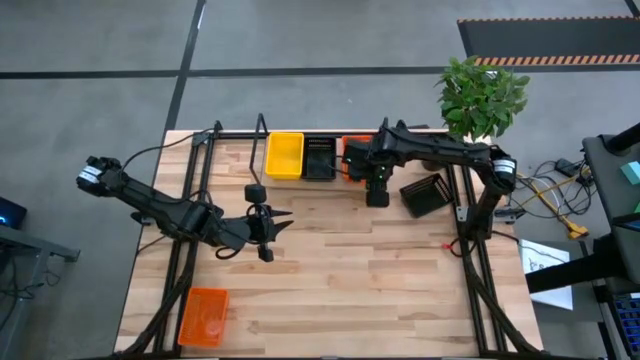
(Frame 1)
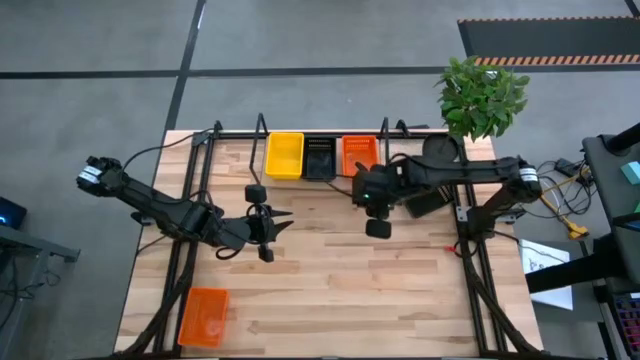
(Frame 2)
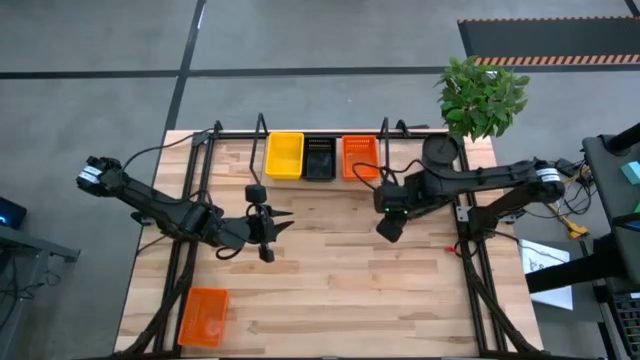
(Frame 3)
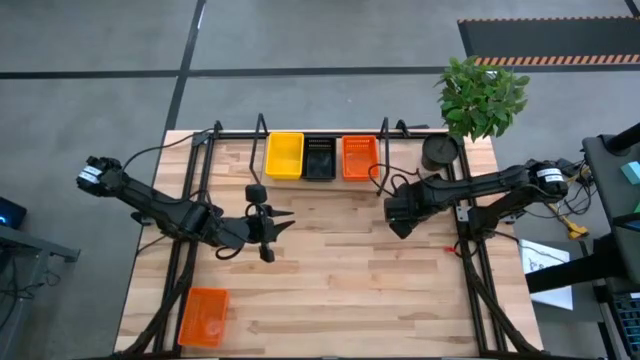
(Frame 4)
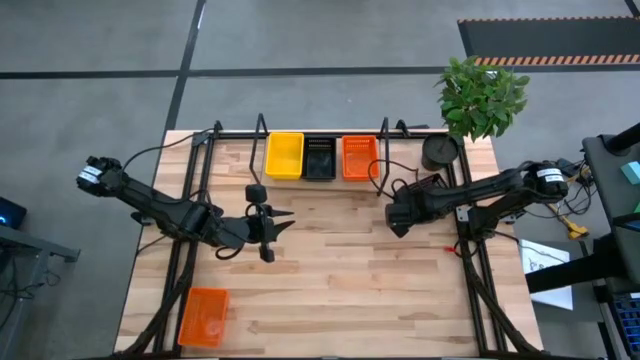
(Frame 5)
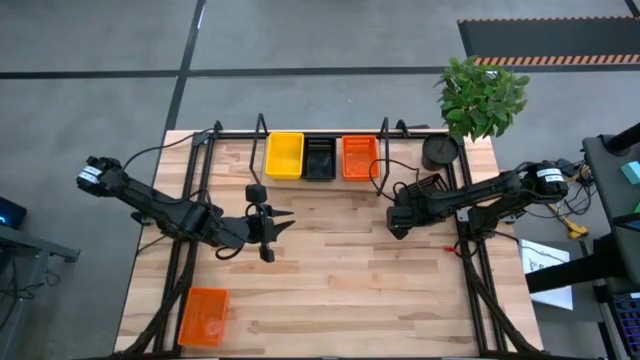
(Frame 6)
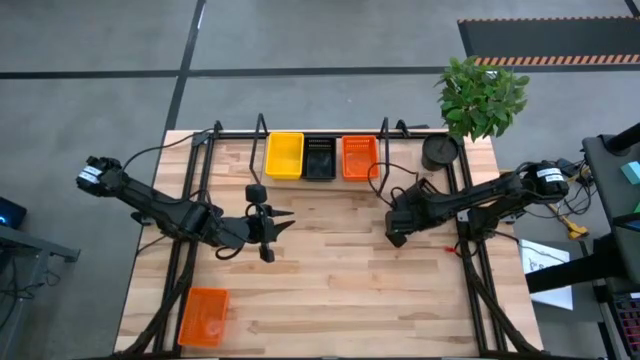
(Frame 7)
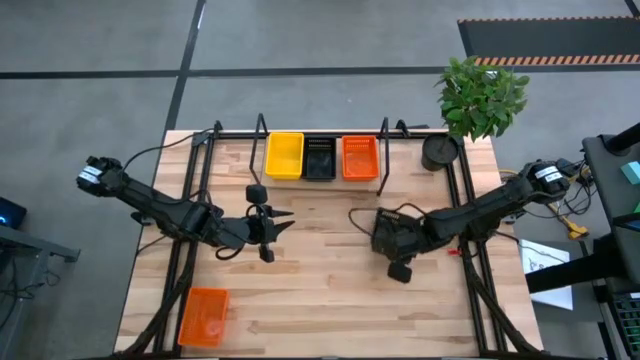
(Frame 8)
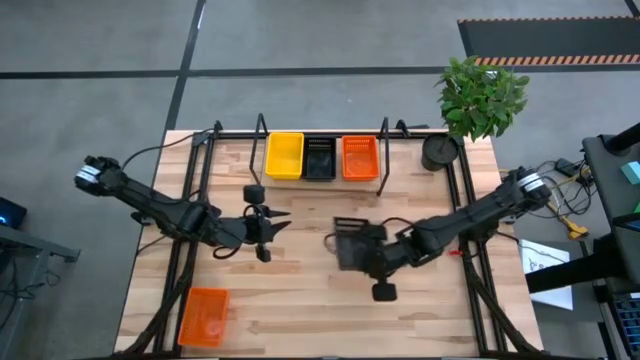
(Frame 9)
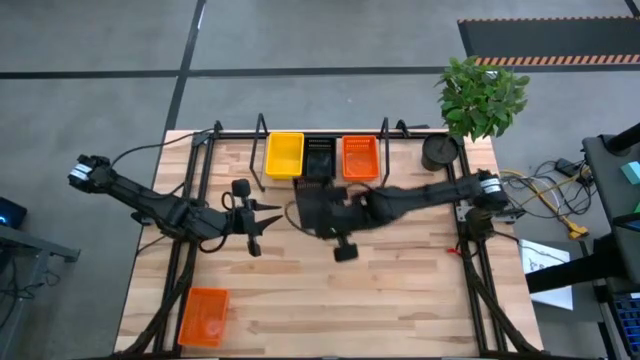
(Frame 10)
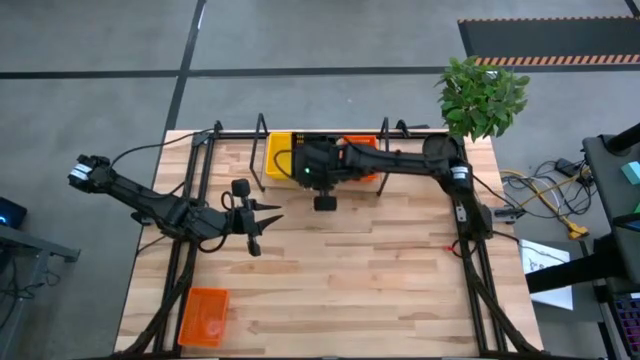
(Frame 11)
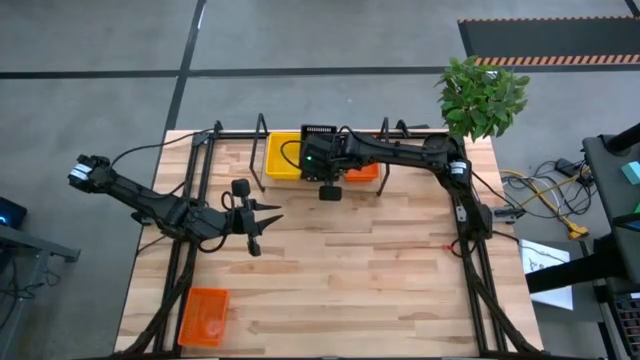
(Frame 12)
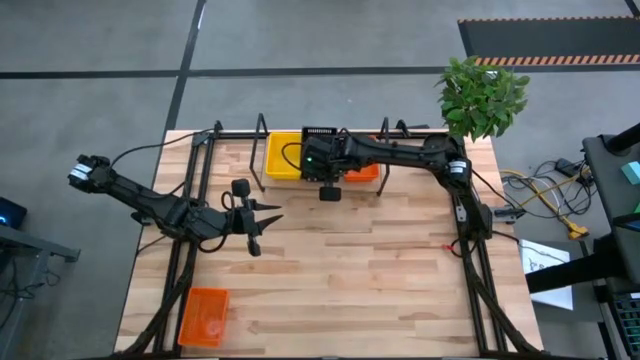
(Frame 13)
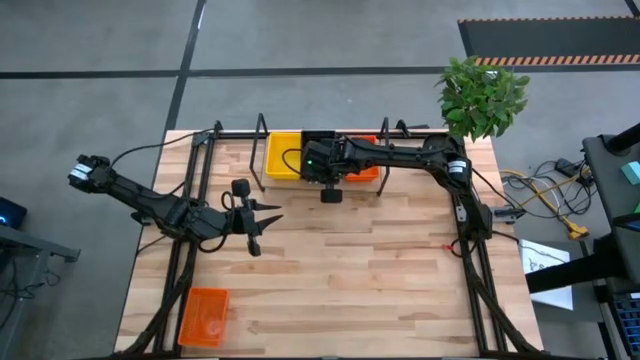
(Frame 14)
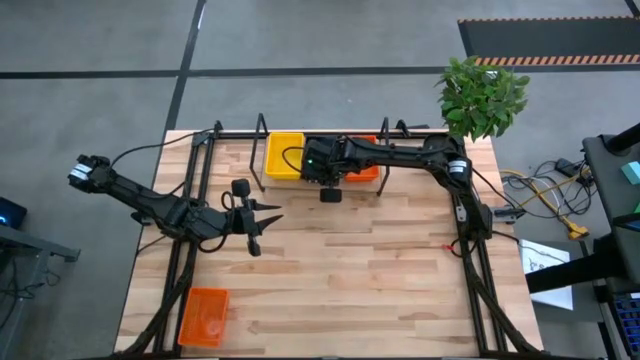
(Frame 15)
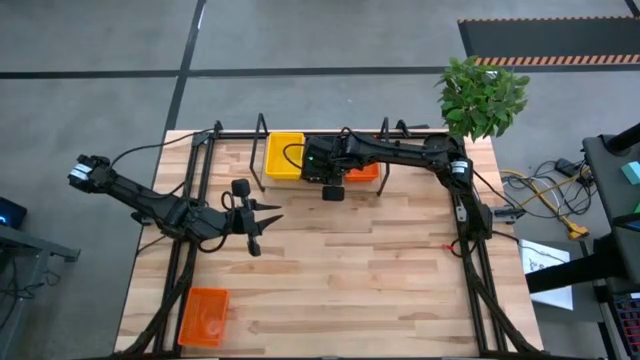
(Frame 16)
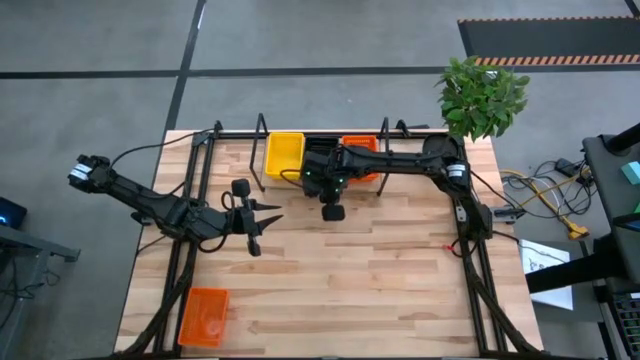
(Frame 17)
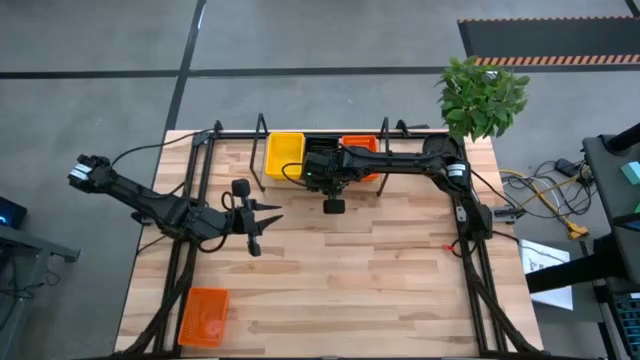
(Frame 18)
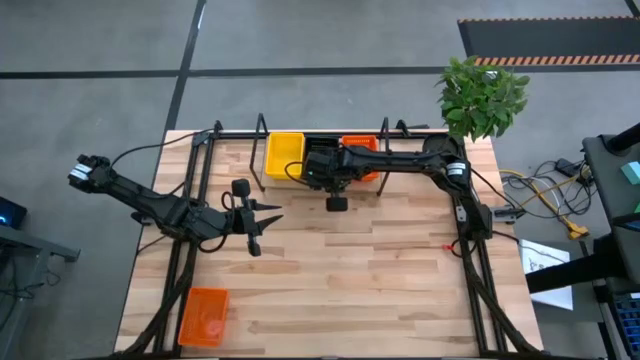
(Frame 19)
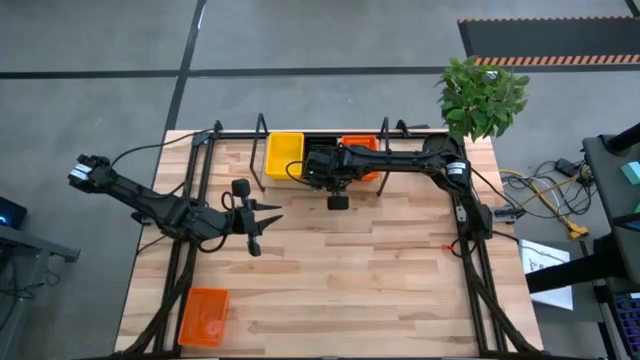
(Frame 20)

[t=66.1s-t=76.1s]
Task: Stack baskets on shelf by color
Stack the black bin on top of the other stacked black bins on the shelf

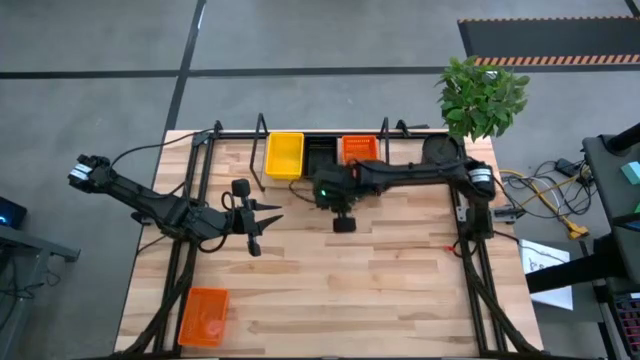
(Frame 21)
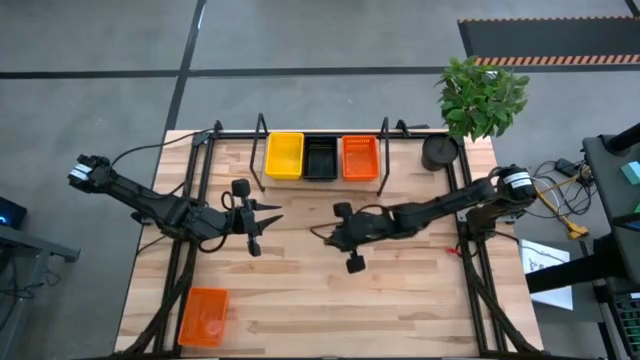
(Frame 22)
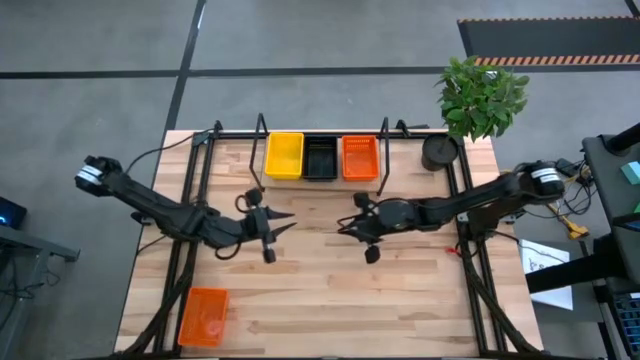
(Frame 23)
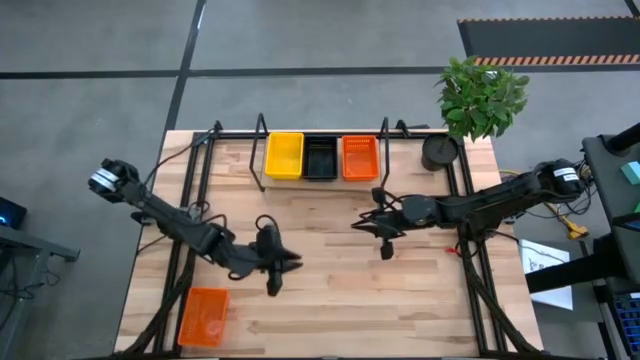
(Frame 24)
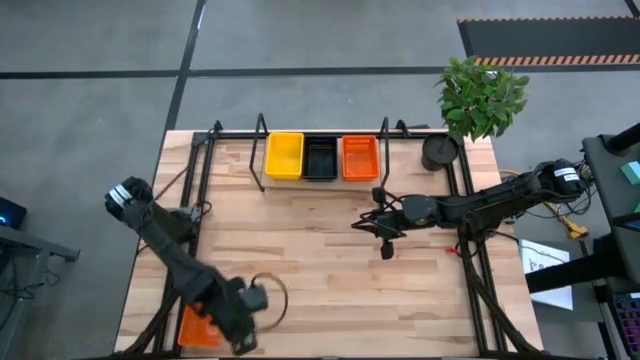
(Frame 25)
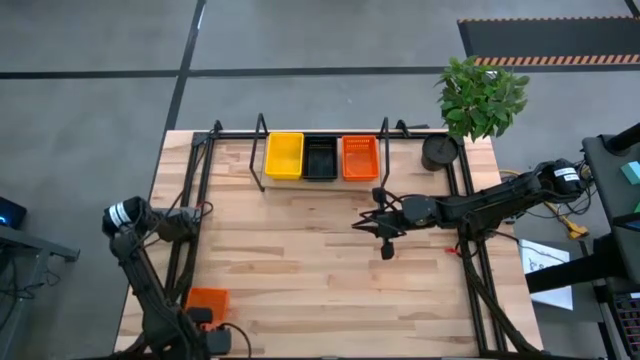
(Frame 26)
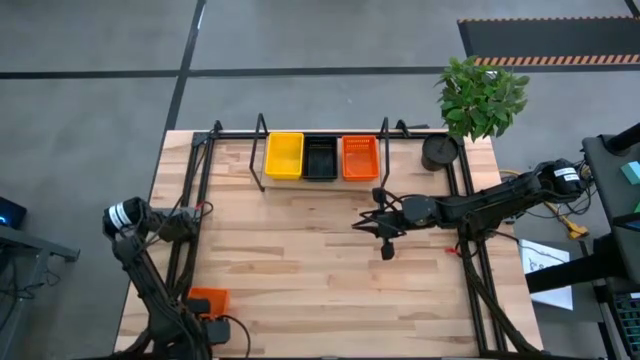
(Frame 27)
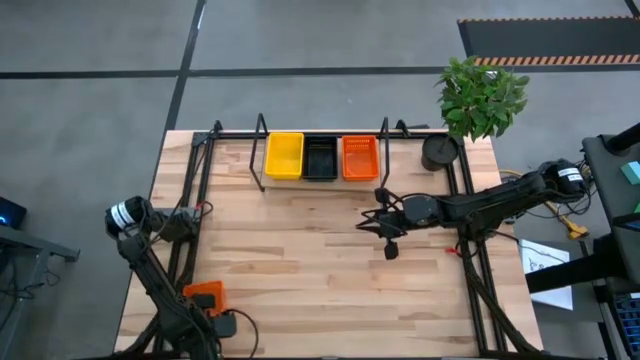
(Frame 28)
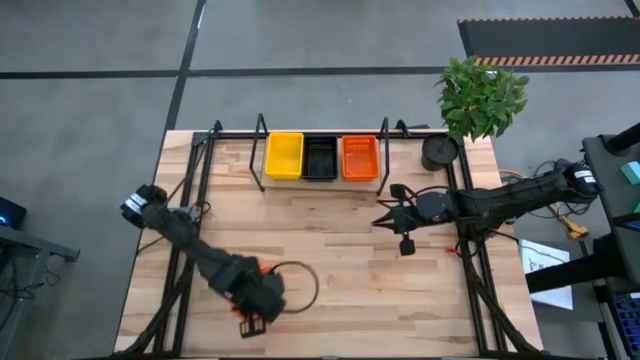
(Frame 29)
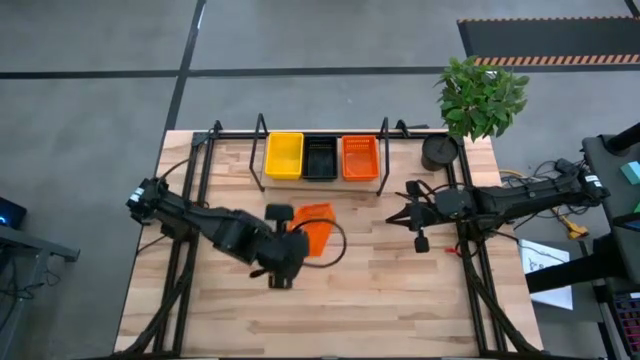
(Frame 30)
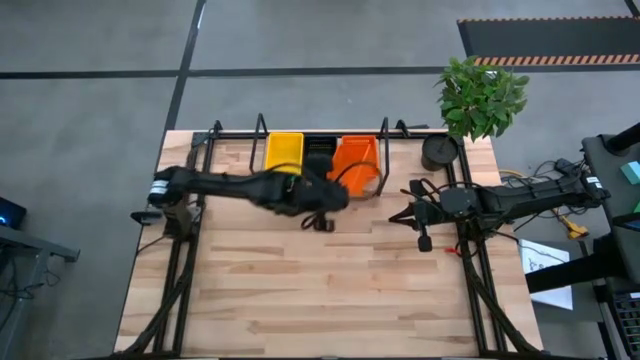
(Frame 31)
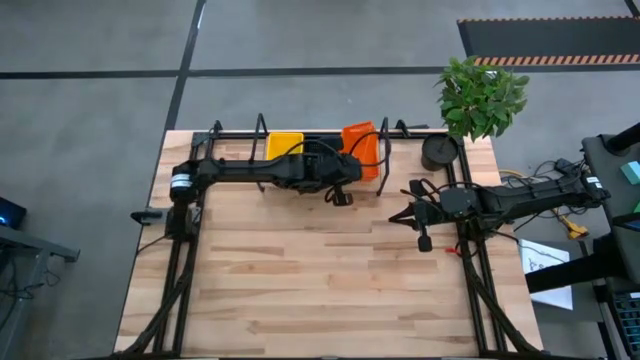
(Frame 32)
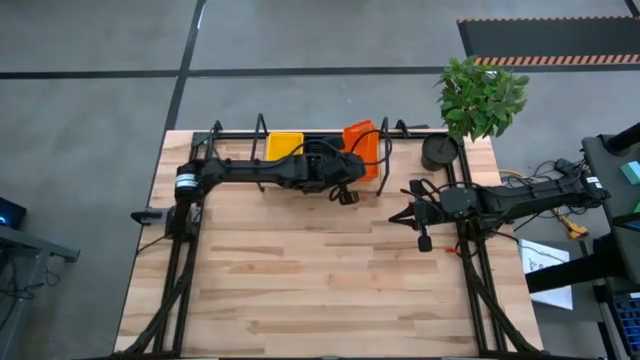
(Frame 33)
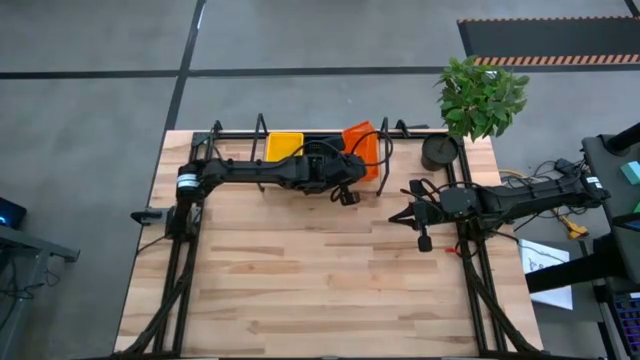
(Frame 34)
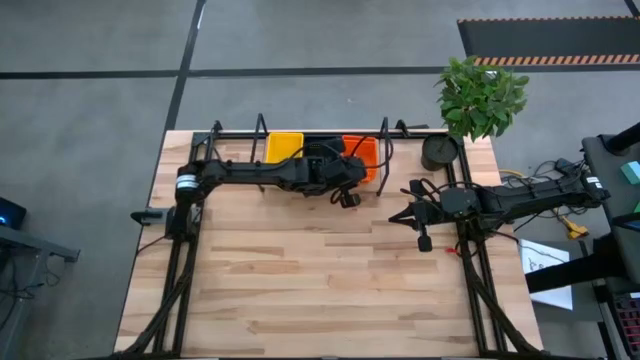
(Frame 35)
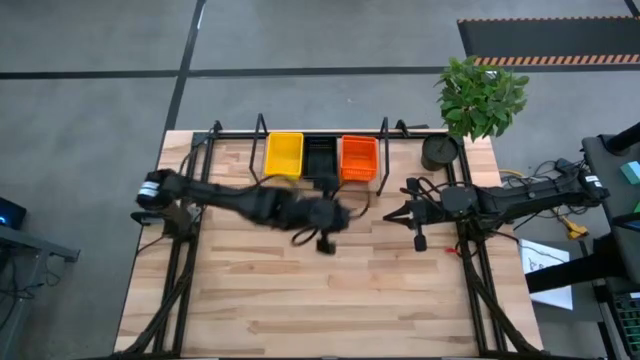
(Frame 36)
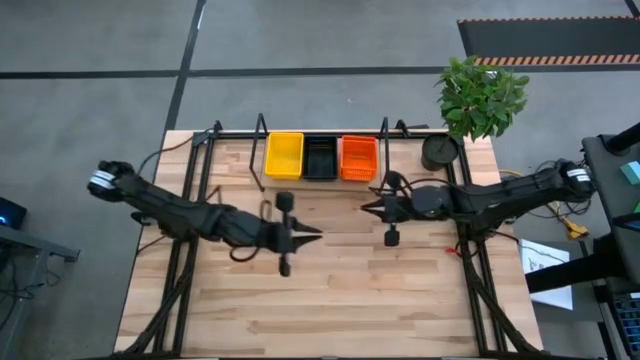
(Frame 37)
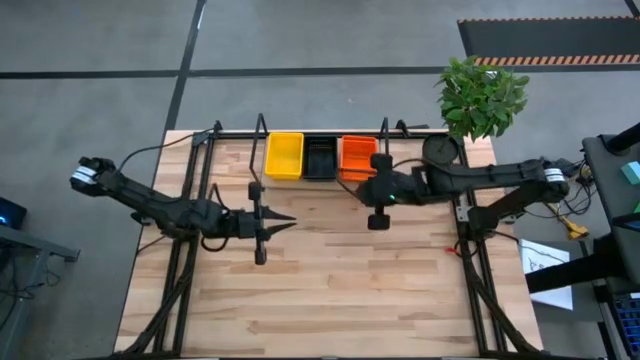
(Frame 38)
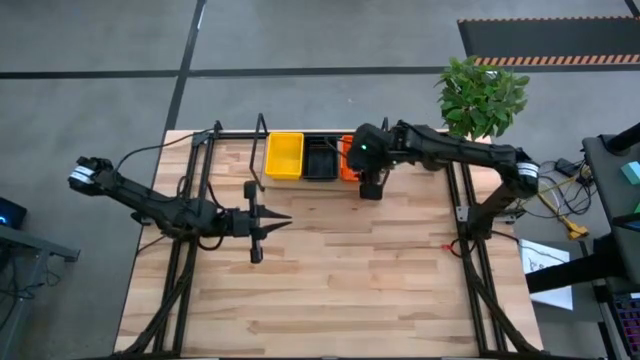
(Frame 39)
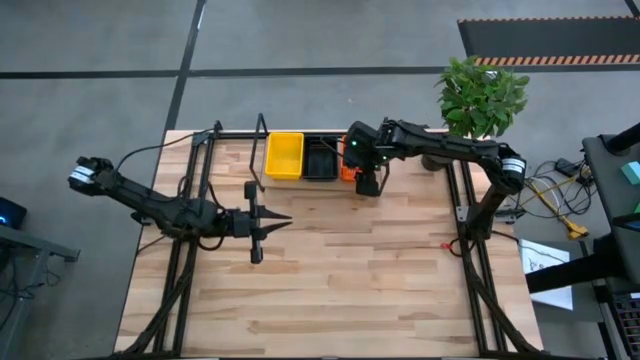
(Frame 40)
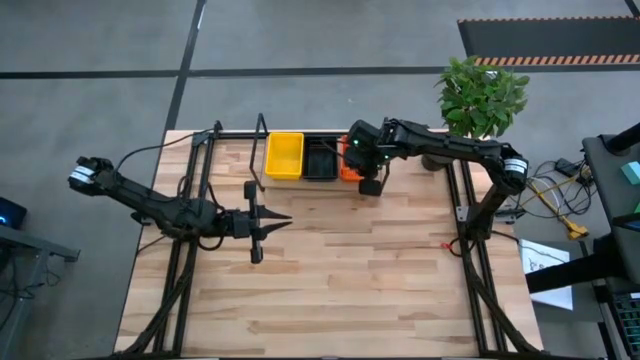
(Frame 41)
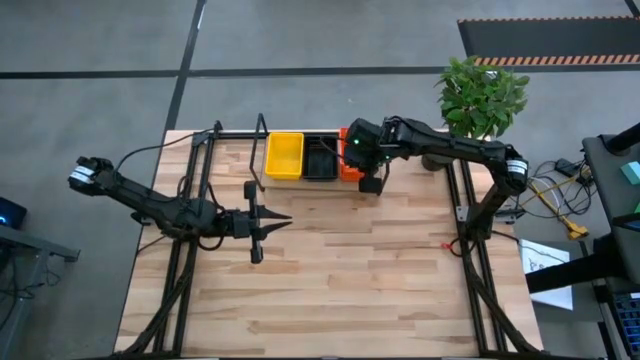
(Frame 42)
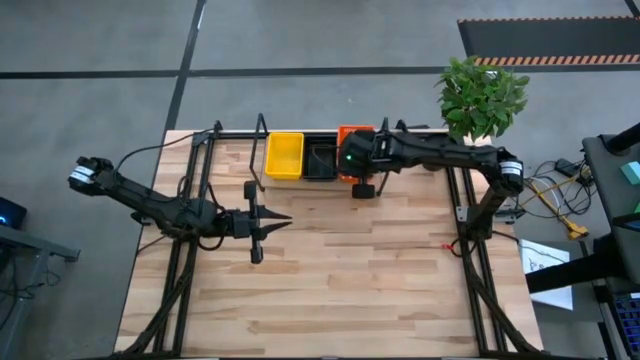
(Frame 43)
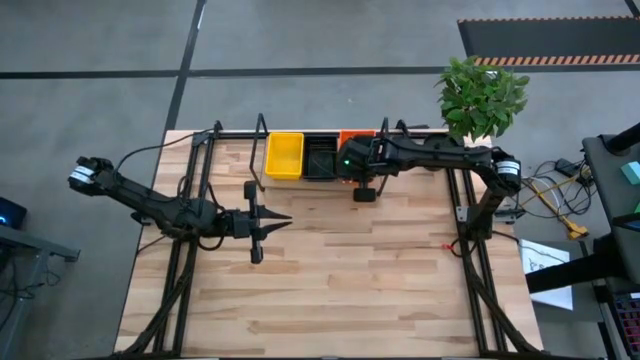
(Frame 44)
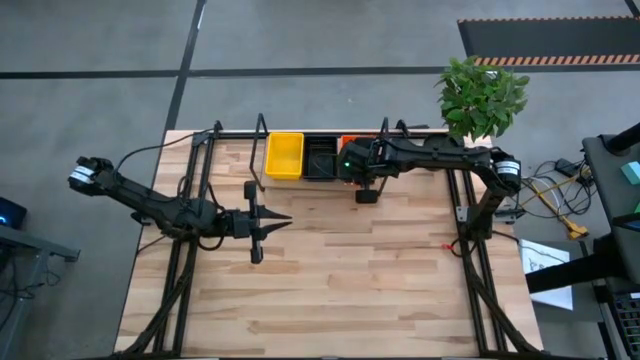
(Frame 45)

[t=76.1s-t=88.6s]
Stack the orange bin on top of the other stacked orange bins on the shelf
